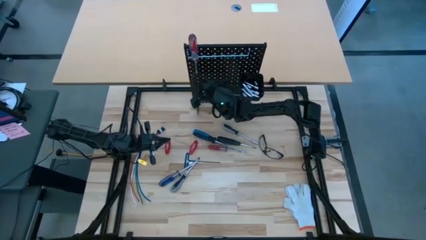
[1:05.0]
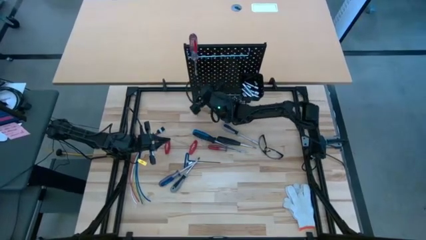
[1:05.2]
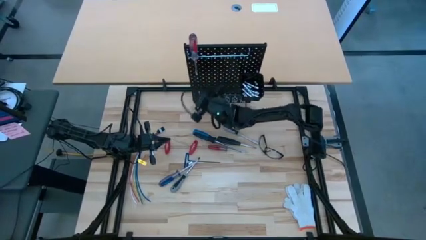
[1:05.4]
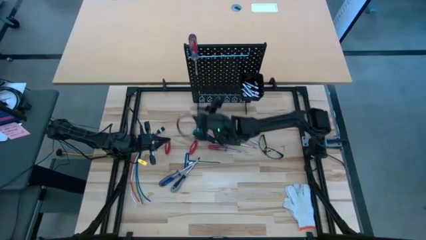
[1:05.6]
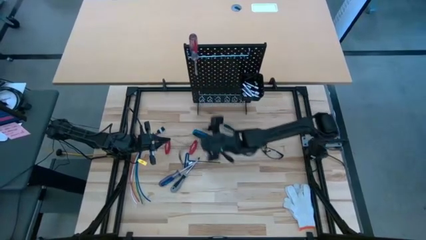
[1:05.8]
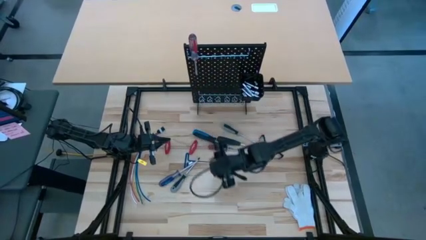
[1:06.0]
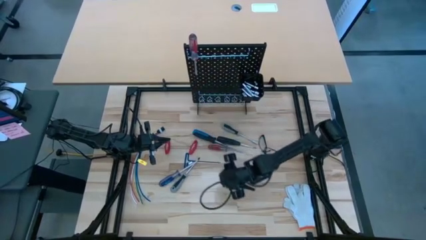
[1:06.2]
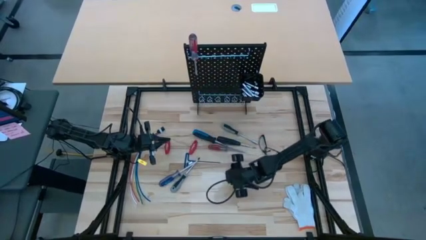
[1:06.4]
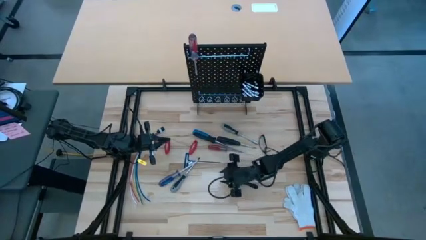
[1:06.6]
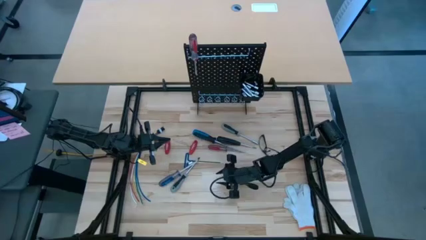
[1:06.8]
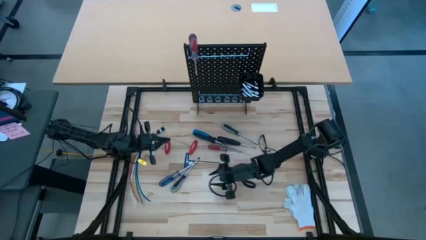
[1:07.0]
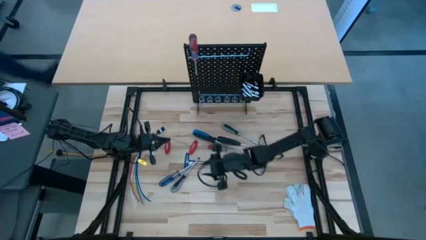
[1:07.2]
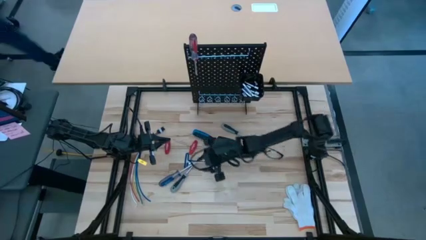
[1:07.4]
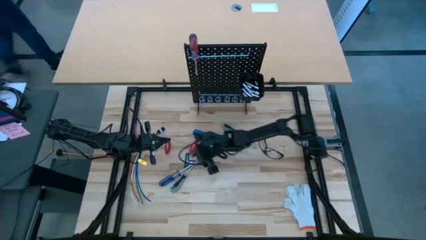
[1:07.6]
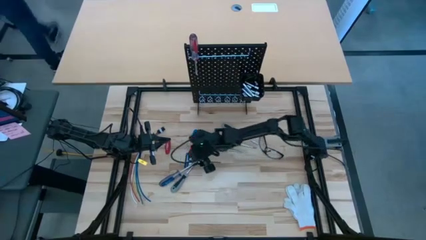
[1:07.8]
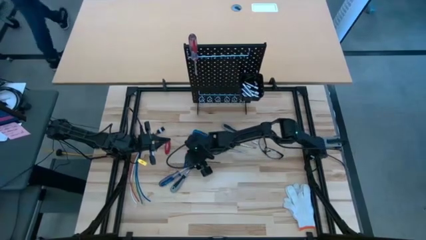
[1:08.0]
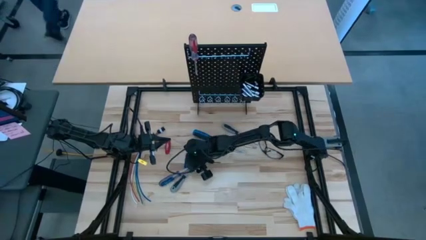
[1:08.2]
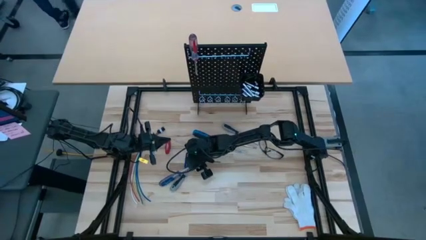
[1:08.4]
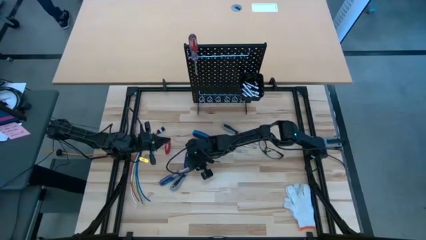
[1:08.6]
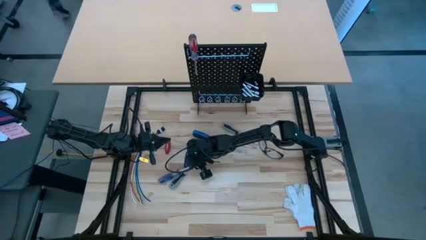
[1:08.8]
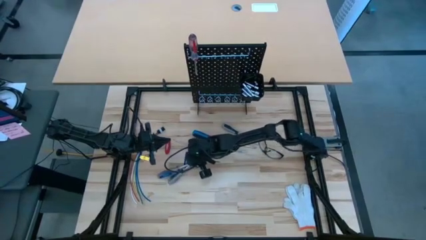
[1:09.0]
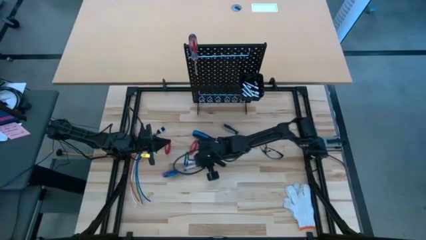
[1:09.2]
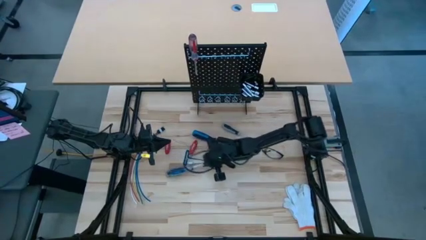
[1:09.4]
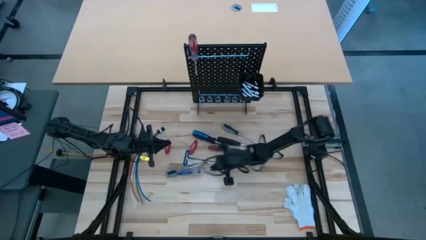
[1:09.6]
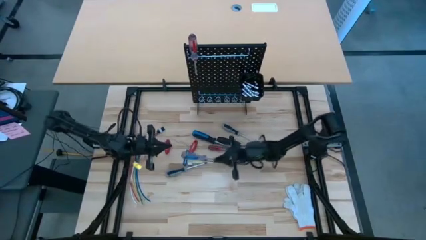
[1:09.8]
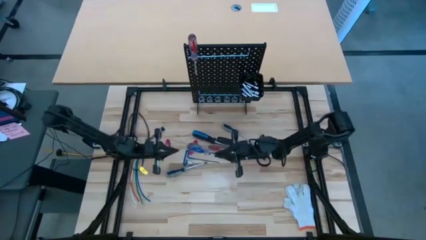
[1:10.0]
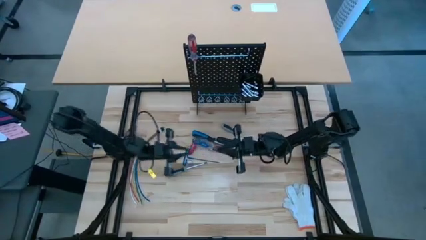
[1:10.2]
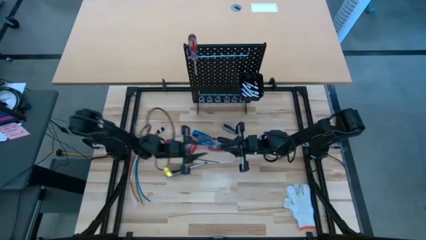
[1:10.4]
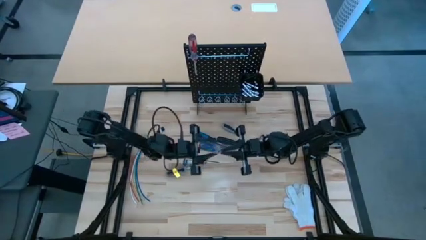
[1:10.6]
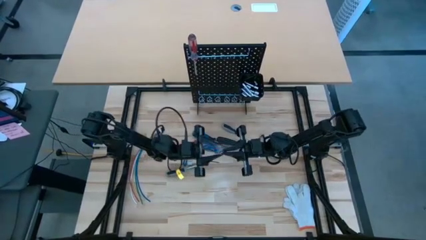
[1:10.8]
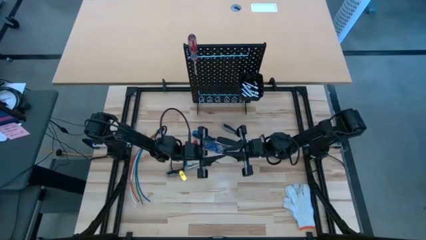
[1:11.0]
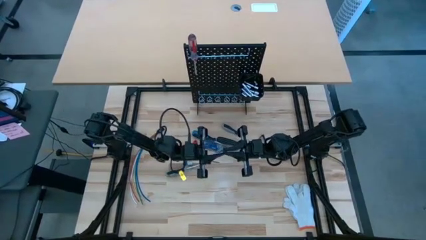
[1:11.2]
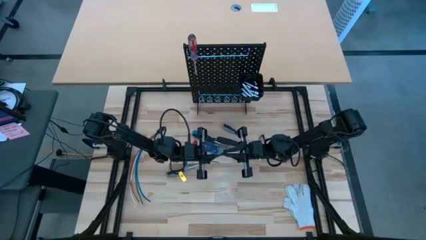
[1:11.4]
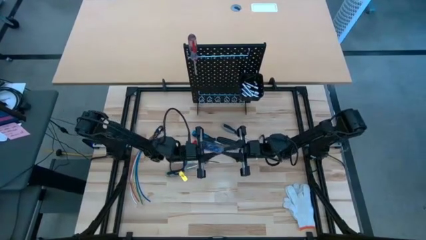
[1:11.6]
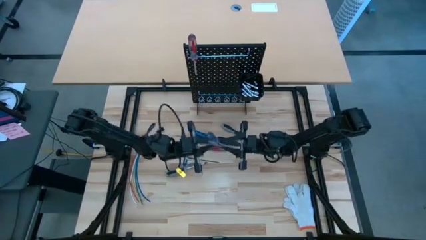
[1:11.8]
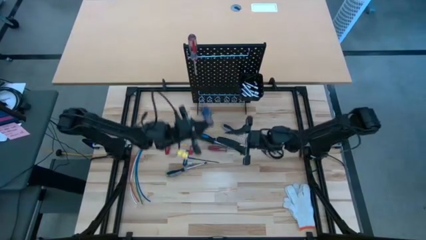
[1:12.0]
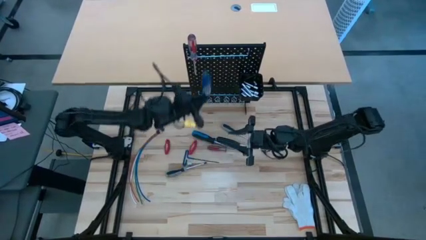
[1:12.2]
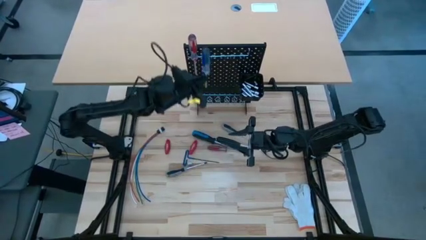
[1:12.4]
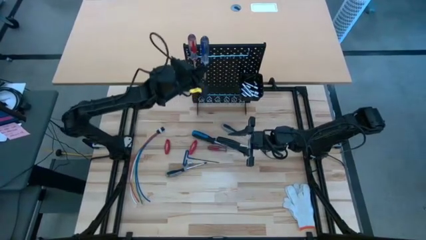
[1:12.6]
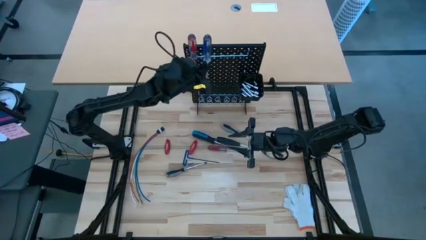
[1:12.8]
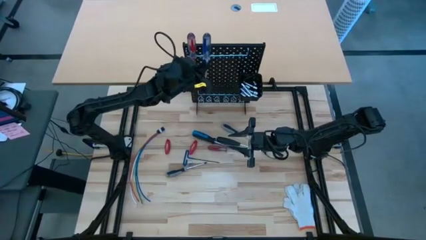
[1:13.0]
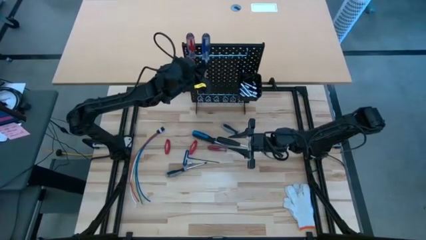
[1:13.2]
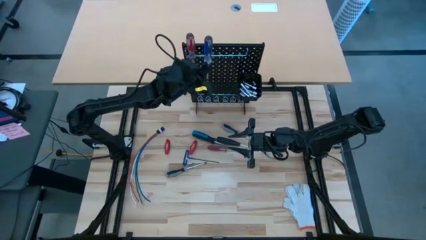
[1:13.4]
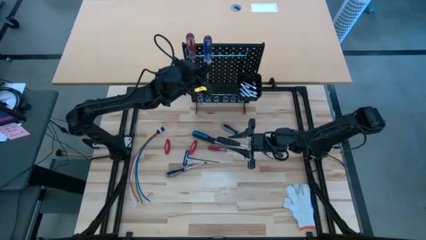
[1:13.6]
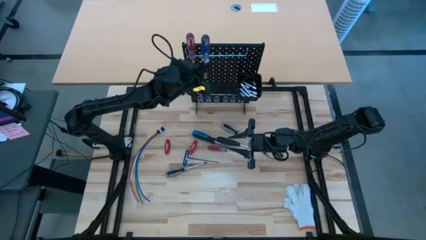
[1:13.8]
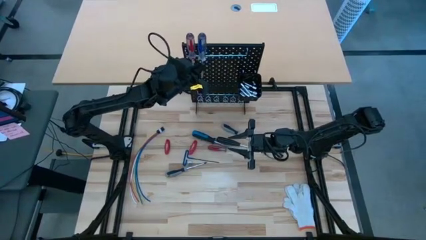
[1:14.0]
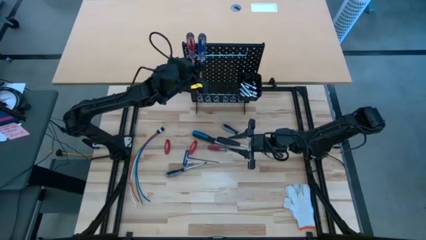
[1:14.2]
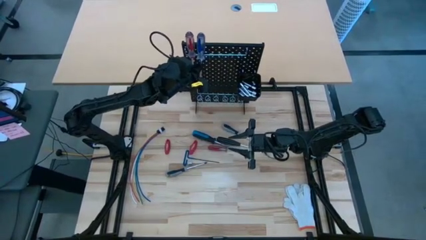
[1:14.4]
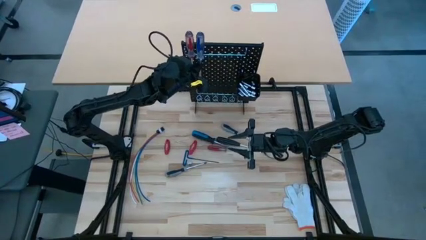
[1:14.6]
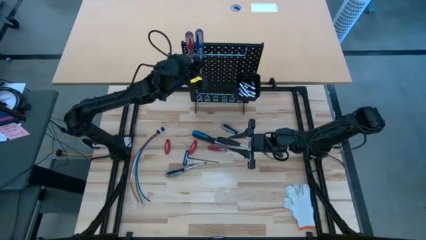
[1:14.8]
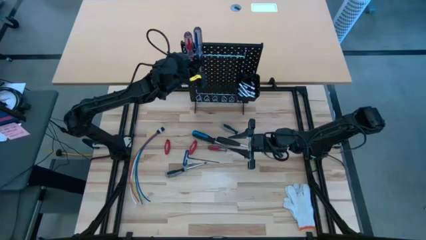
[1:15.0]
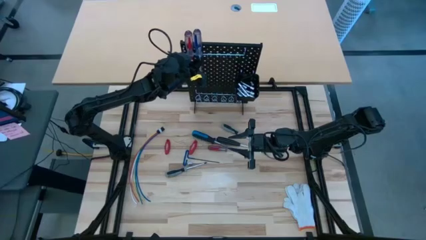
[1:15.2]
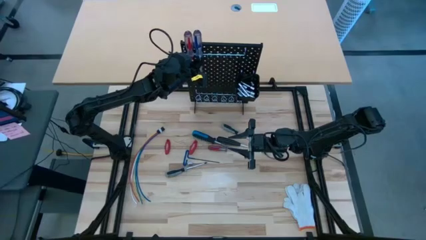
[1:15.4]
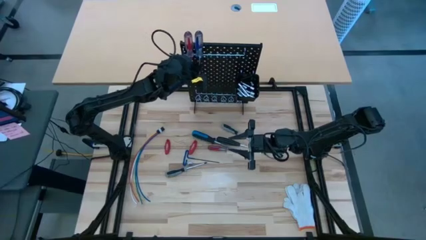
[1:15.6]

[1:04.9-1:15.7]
Task: Hang tools onto peg board
Hang the blue screwdriver on the pegboard

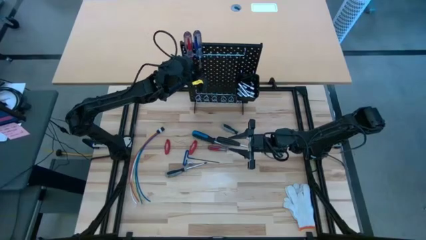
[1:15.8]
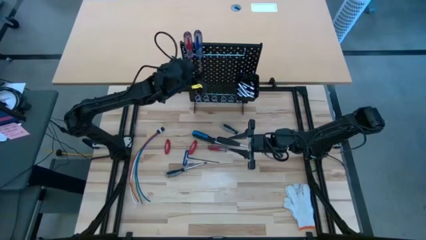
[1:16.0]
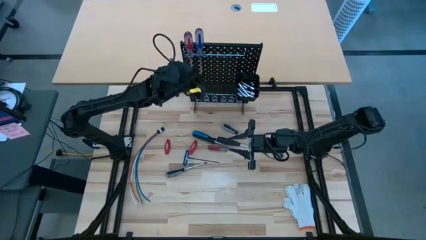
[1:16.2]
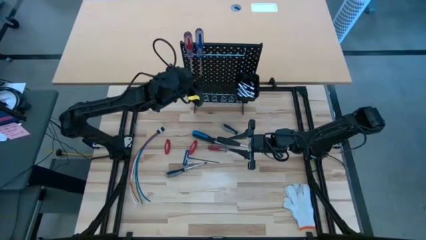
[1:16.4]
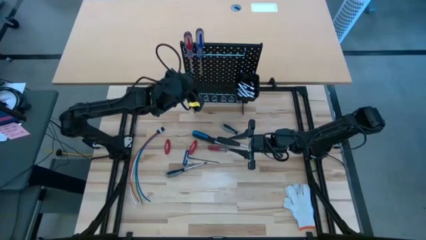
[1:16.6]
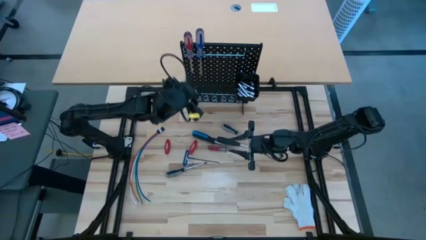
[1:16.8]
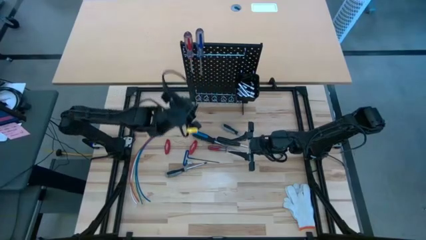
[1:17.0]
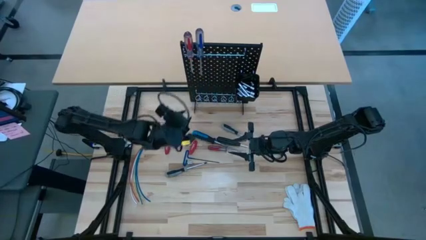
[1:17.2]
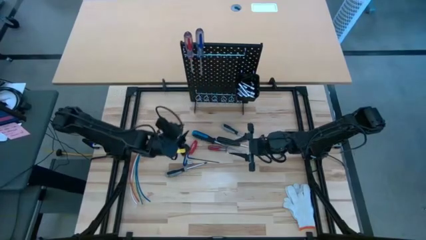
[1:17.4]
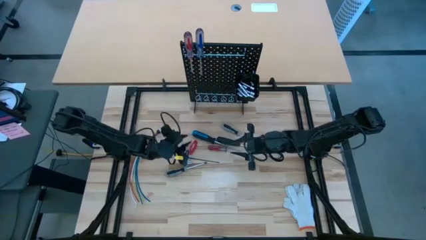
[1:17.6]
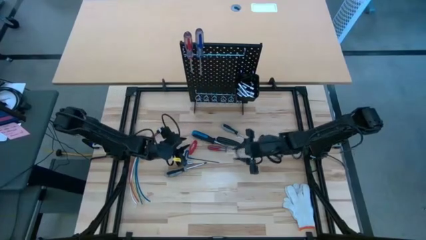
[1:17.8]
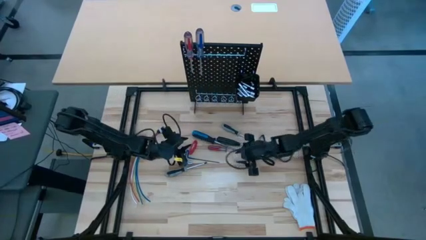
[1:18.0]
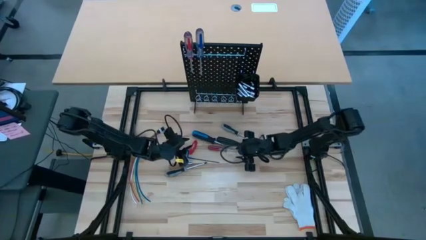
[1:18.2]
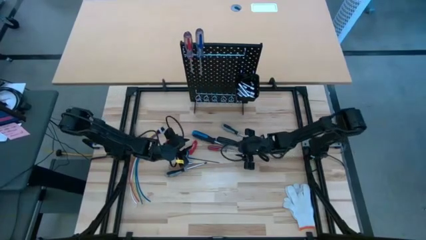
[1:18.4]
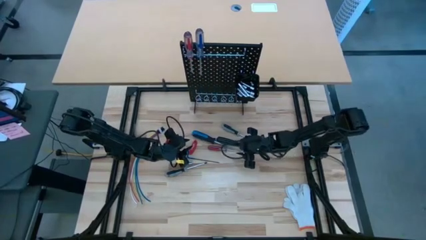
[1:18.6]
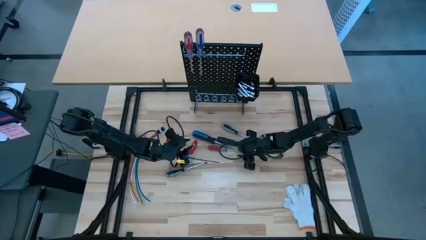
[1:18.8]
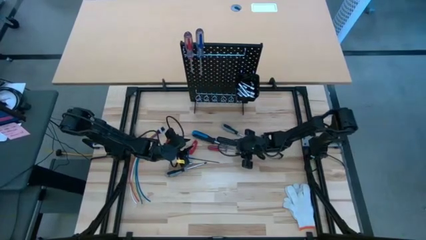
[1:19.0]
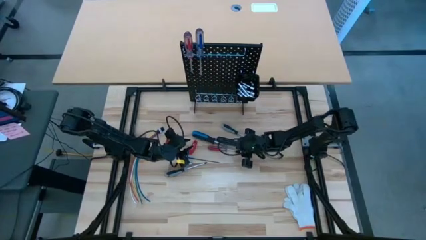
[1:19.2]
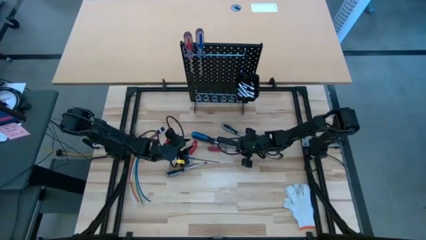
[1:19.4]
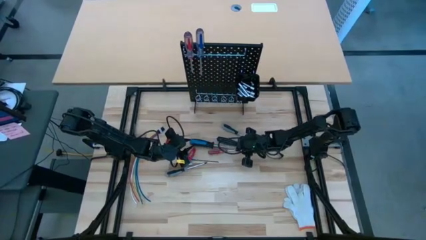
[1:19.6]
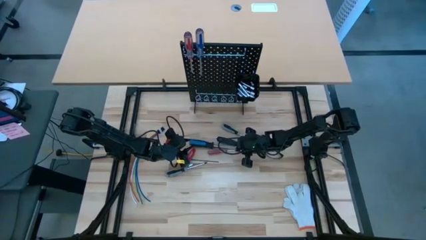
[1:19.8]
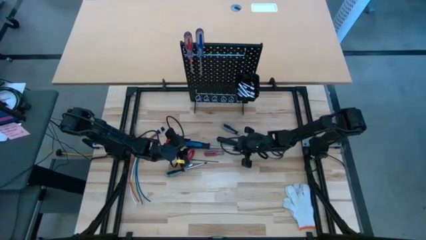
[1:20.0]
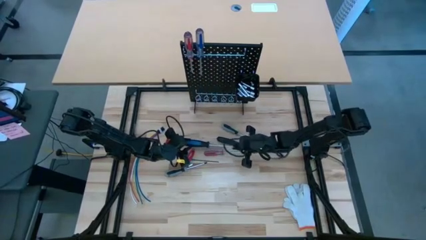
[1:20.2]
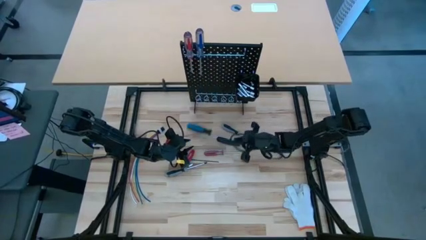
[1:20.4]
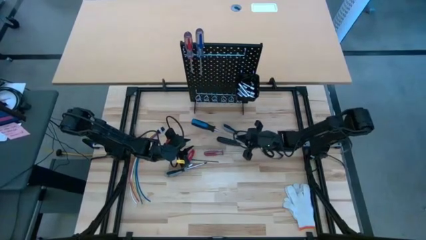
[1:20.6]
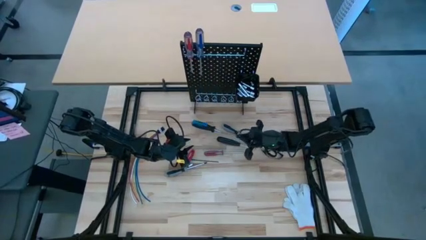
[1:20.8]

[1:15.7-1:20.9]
Hang the blue screwdriver on the pegboard
